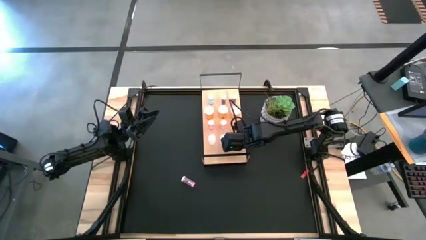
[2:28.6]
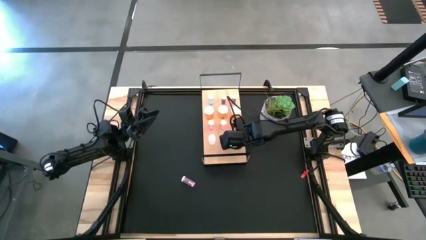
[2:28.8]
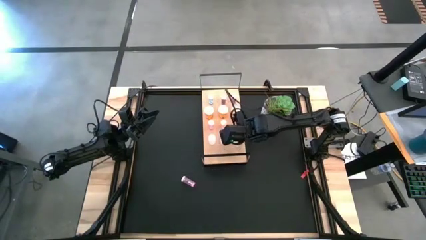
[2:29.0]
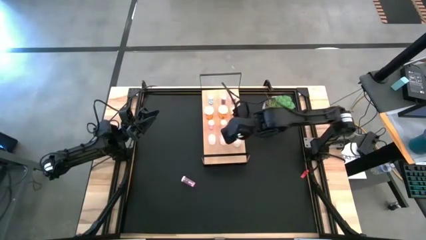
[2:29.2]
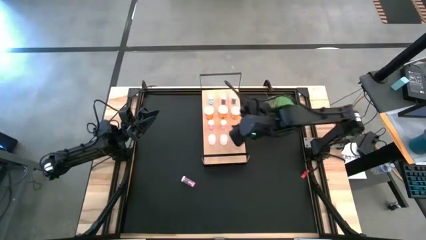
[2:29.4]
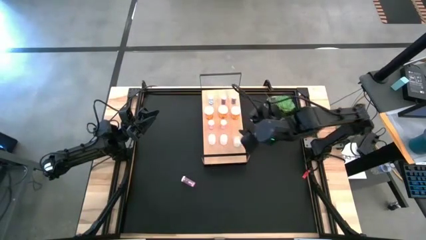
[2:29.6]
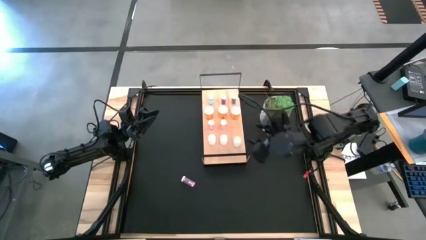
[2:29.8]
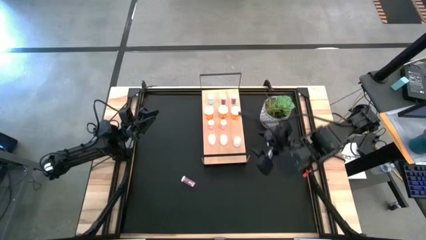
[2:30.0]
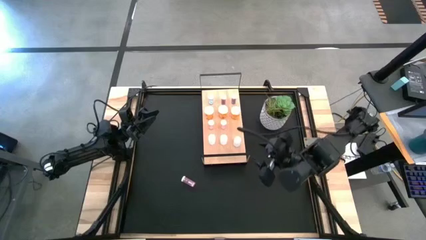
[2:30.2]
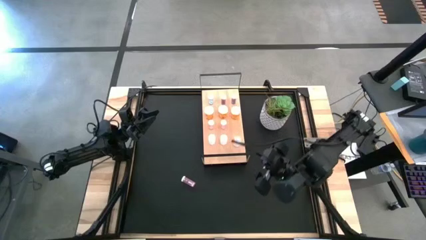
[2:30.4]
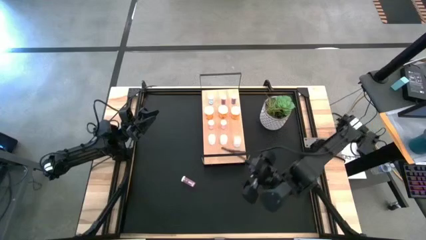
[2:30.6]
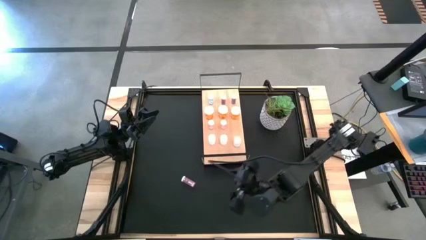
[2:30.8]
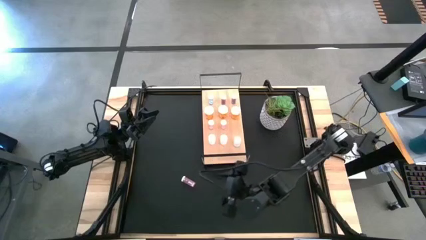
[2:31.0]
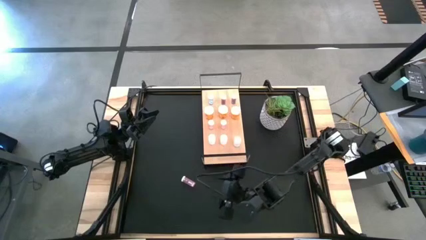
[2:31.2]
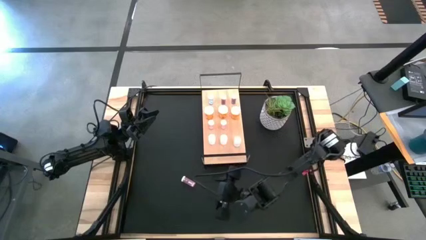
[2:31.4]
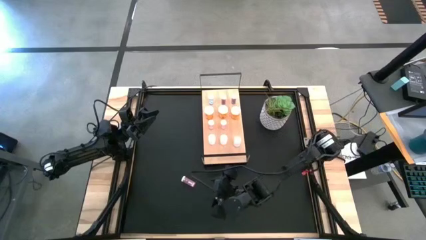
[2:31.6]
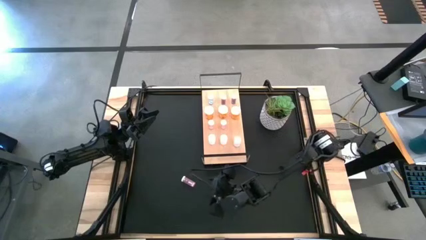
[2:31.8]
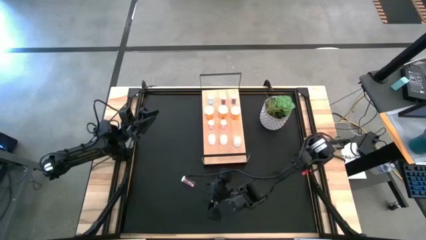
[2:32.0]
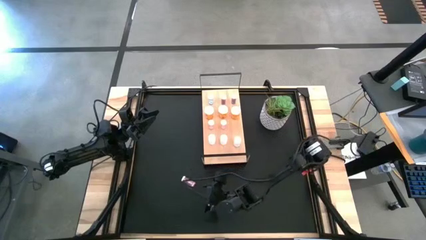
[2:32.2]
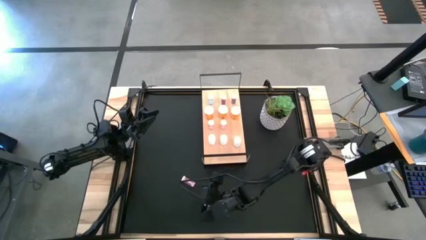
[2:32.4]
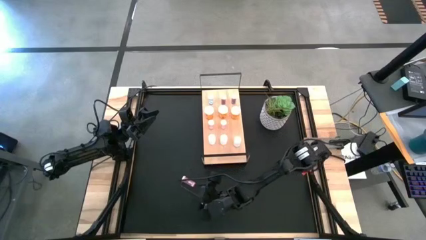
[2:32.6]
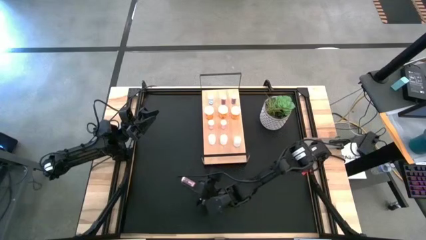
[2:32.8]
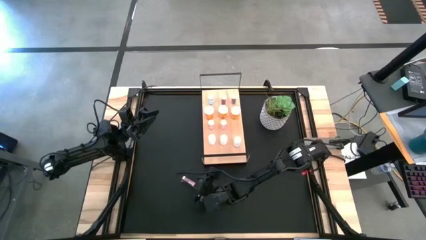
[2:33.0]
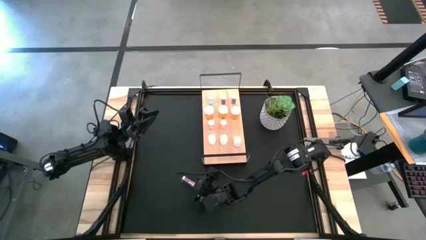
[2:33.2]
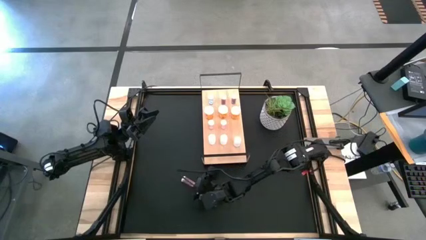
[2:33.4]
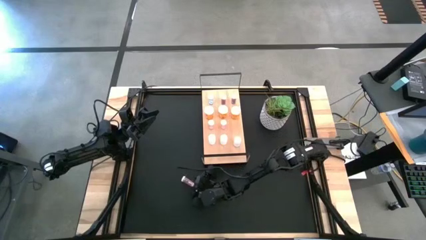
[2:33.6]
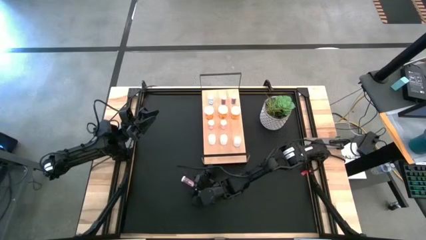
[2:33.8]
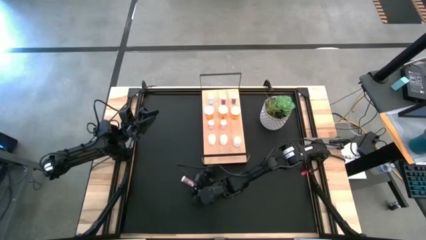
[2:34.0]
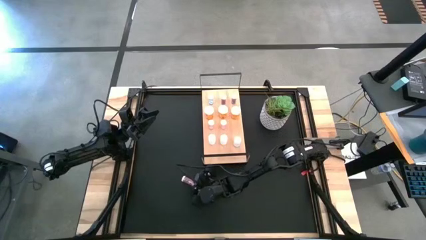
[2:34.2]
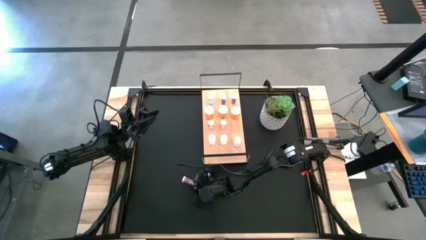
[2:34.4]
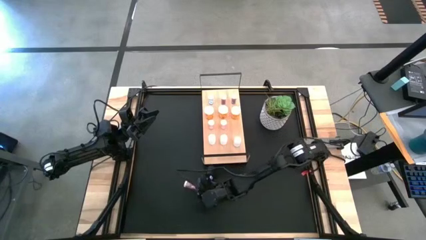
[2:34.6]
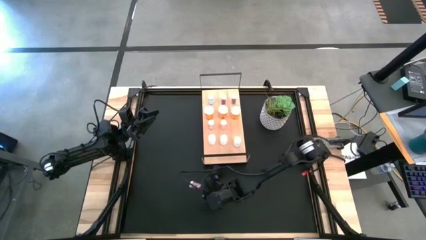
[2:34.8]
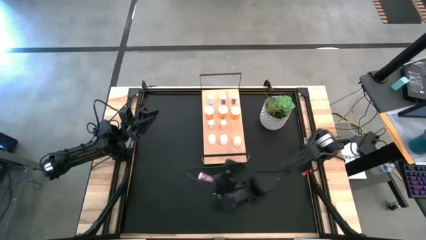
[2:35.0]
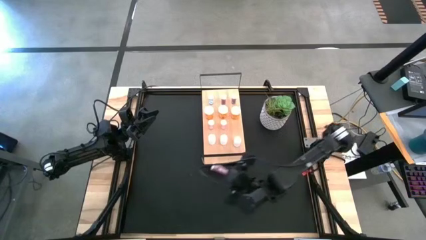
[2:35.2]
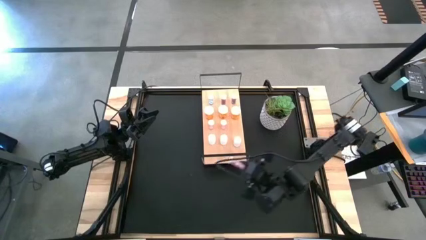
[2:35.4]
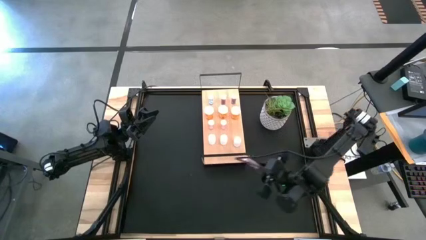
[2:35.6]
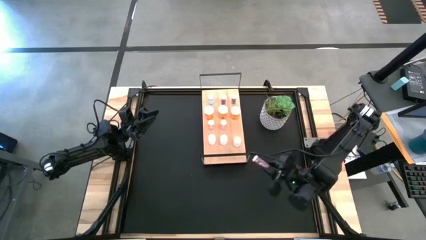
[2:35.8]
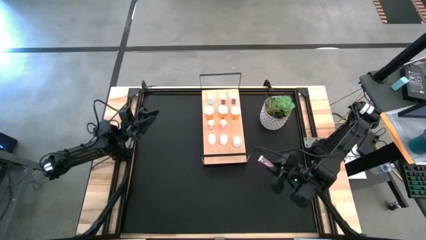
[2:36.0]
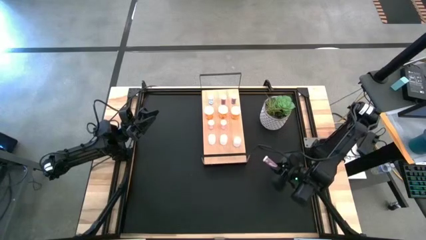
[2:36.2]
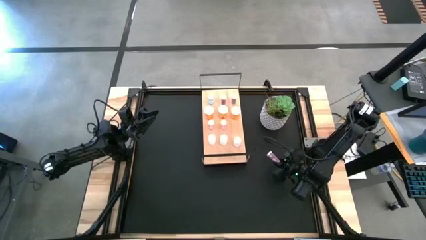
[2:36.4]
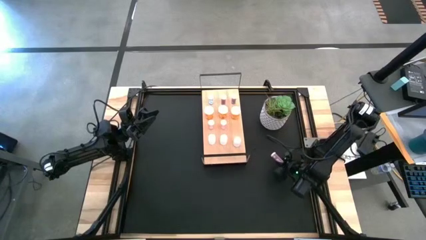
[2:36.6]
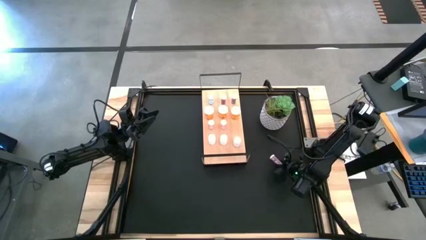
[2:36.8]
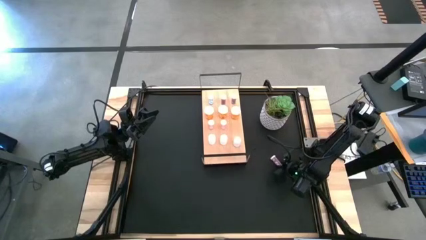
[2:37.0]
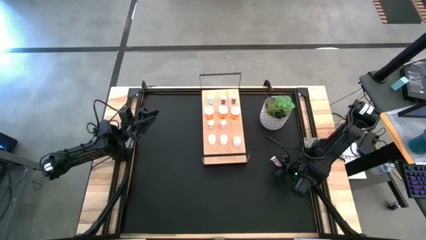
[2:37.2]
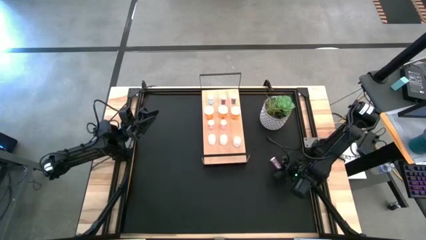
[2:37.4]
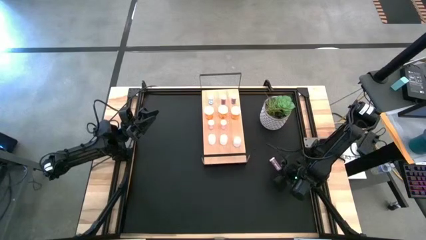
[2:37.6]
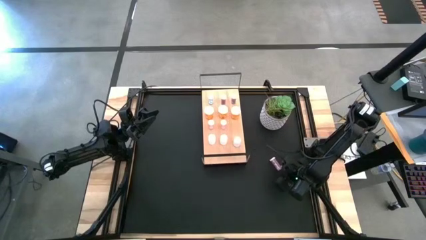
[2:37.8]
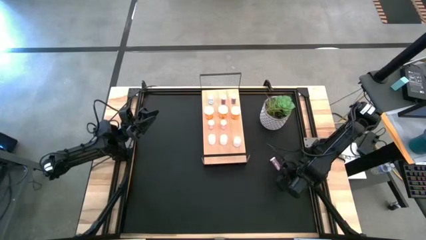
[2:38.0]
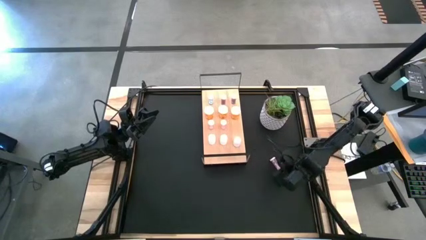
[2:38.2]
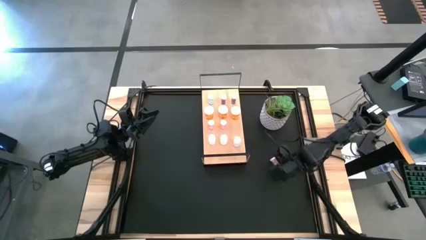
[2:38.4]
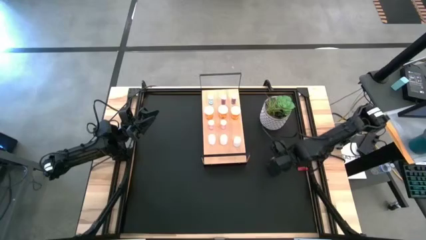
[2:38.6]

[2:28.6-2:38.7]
Task: Pick and place medicine bottles onto shelf by color
Put the pink pill bottle on the shelf aligned with the pink pill bottle

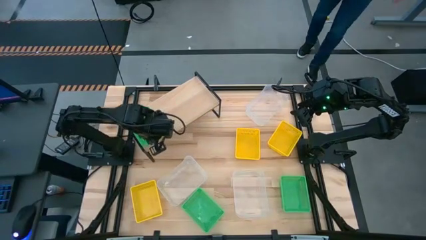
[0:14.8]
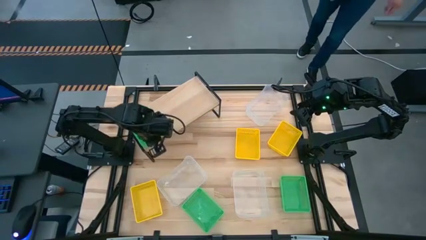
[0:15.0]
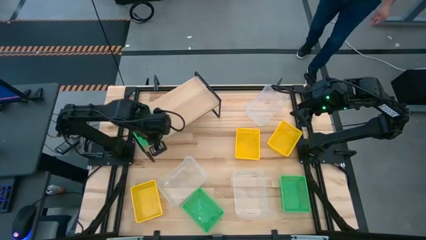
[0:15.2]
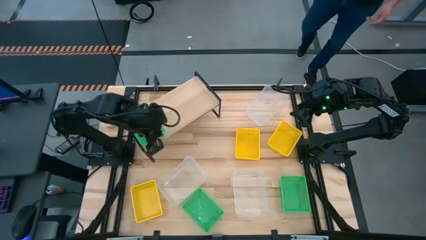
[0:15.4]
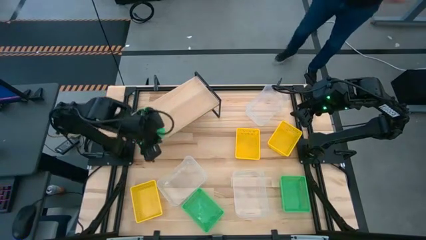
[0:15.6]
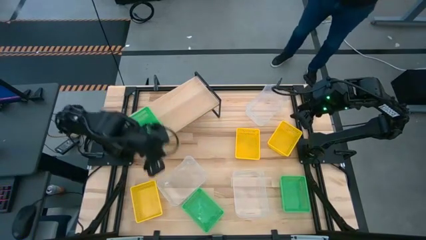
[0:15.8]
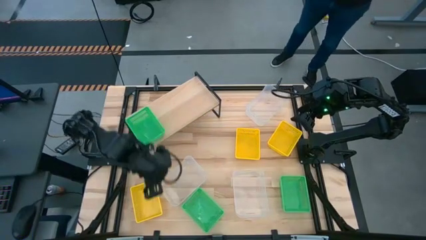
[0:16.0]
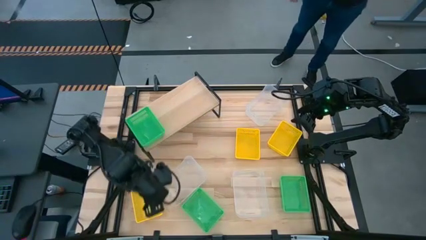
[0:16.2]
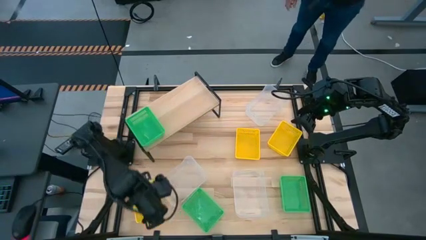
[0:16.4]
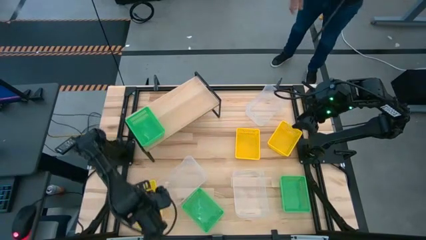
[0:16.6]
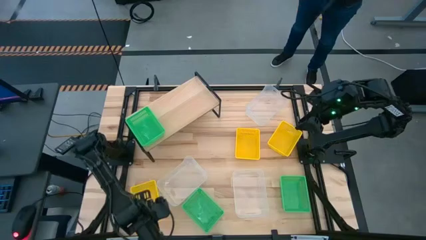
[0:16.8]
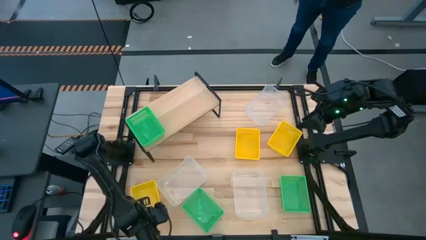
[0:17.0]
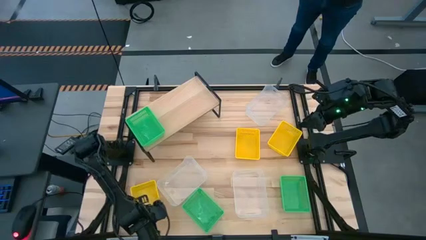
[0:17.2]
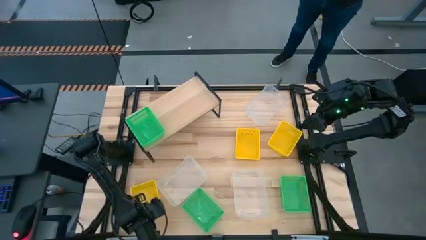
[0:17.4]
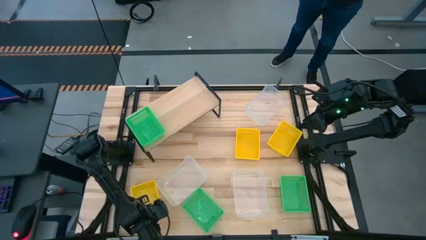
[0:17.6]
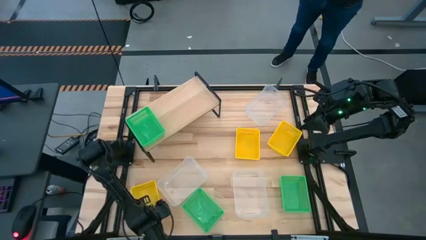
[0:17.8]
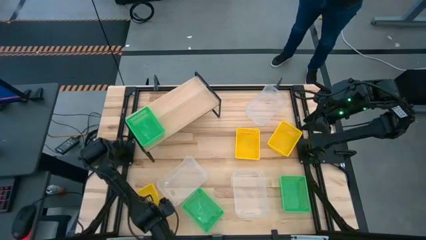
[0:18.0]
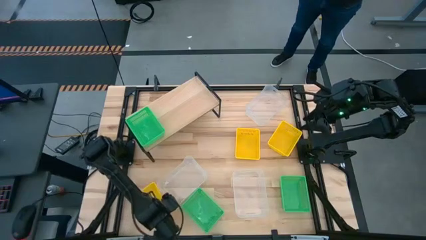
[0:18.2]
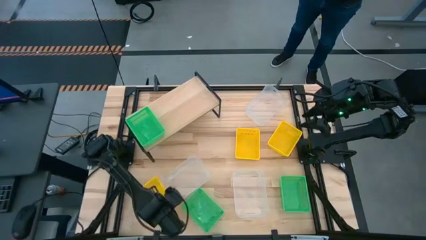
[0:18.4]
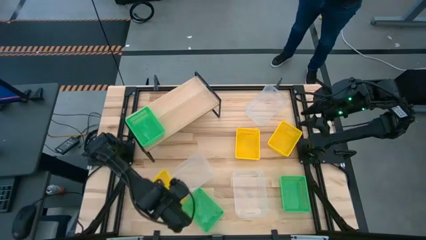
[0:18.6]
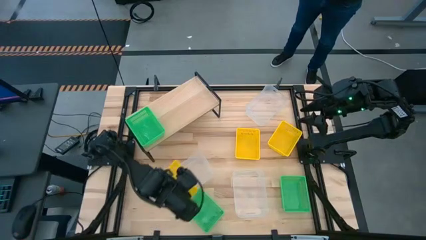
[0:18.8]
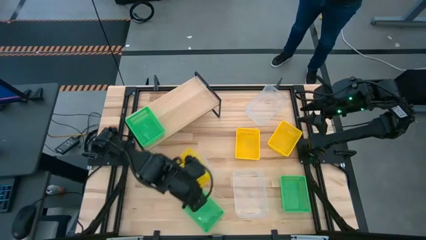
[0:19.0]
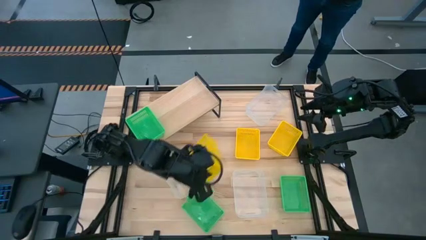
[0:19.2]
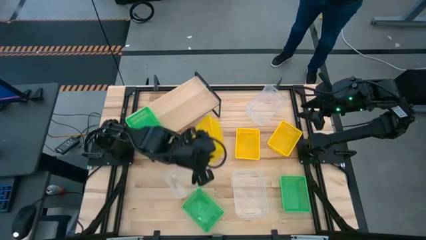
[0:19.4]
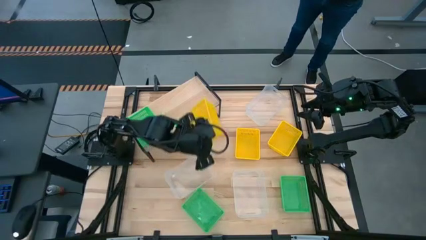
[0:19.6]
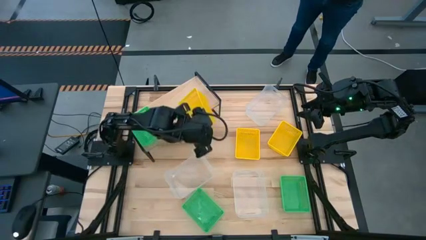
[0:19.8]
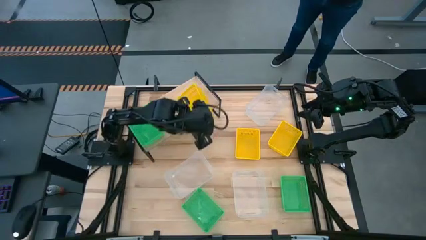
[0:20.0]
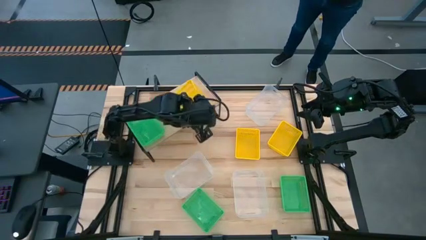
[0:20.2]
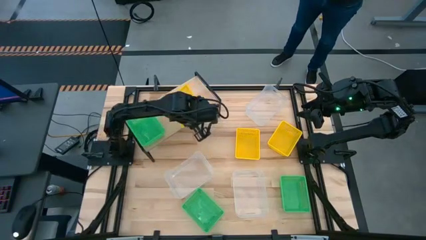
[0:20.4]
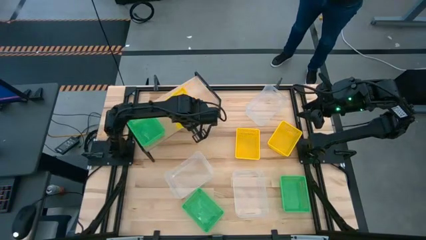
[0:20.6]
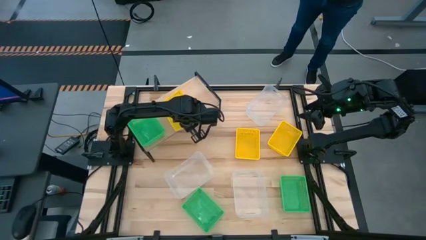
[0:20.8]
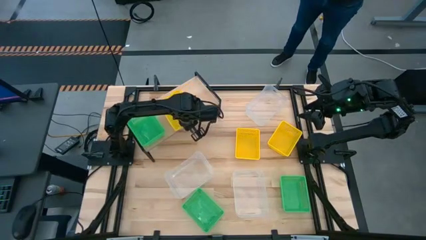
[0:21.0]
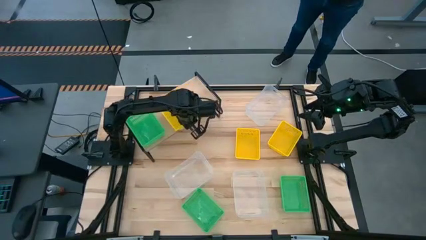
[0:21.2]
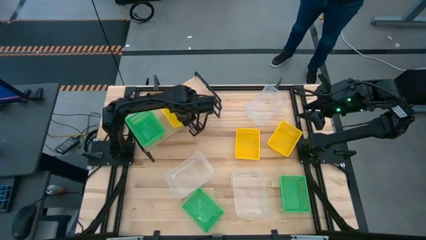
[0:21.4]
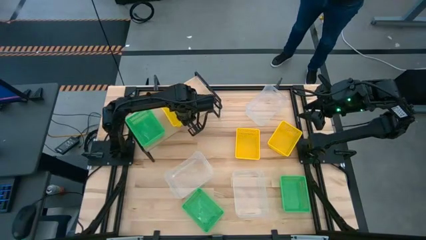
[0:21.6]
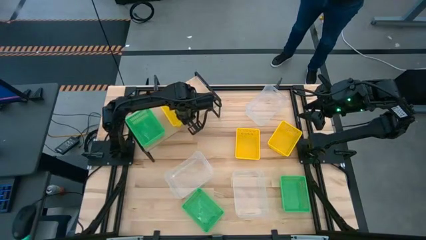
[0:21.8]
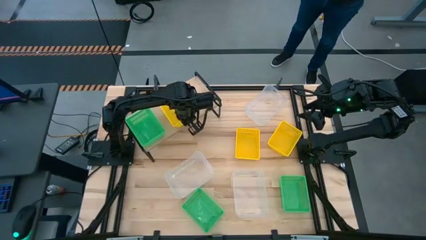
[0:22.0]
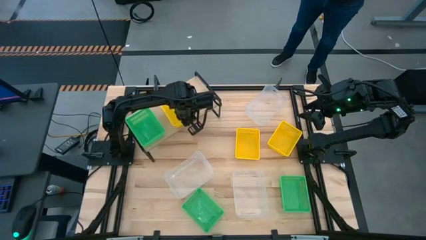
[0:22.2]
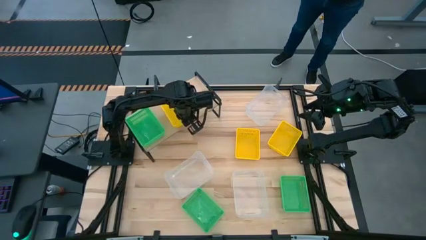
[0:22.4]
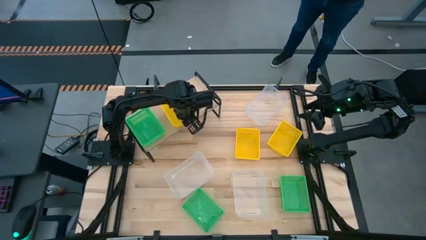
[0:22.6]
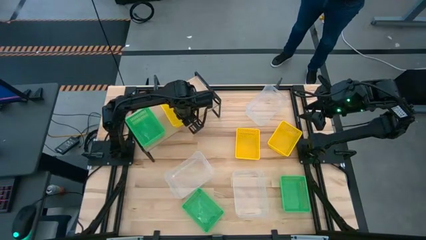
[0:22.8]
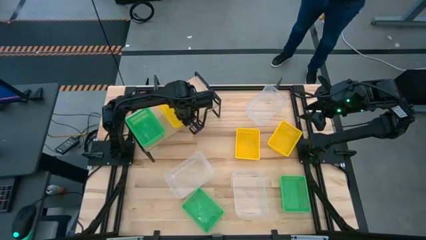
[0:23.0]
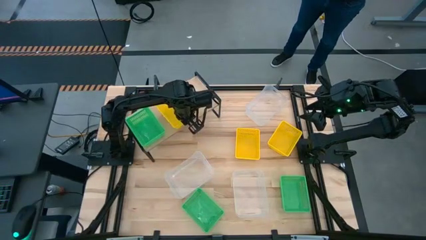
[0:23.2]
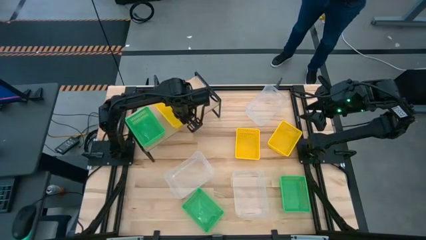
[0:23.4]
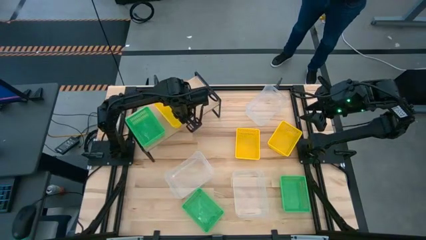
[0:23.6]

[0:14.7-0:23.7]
Task: Stack baskets on shelf by color
Put the bottom yellow bin on the shelf
